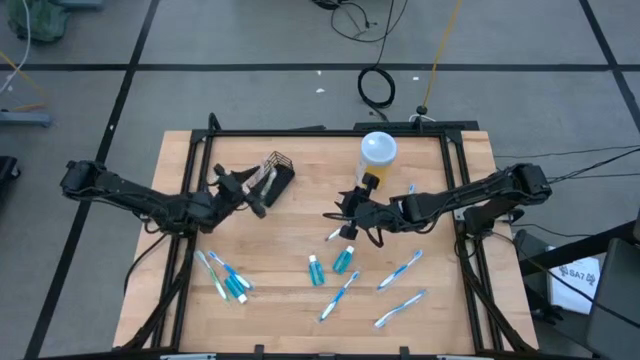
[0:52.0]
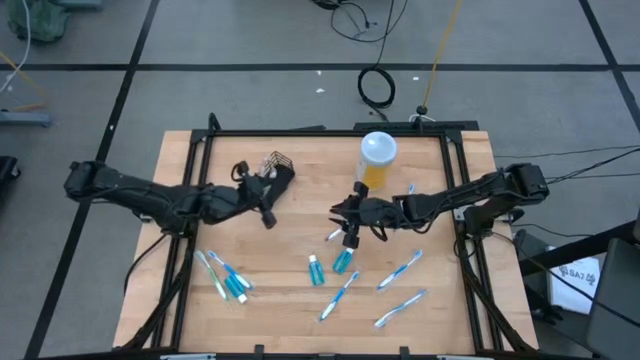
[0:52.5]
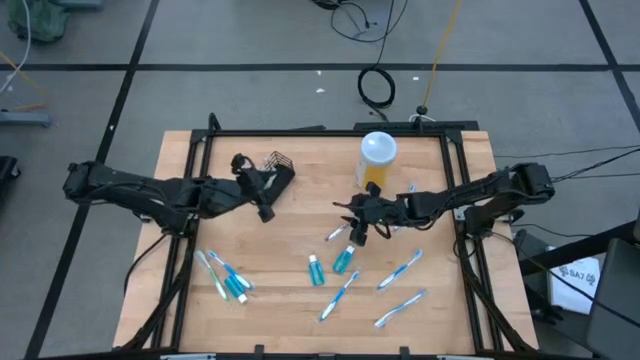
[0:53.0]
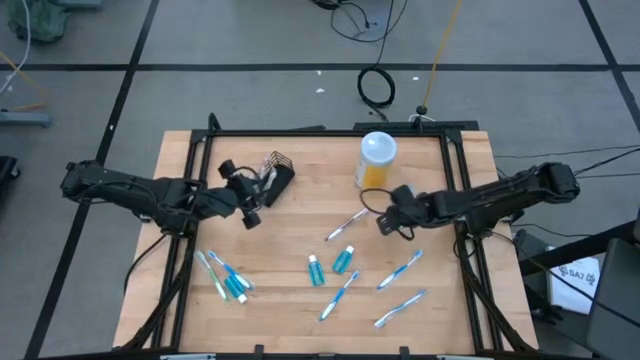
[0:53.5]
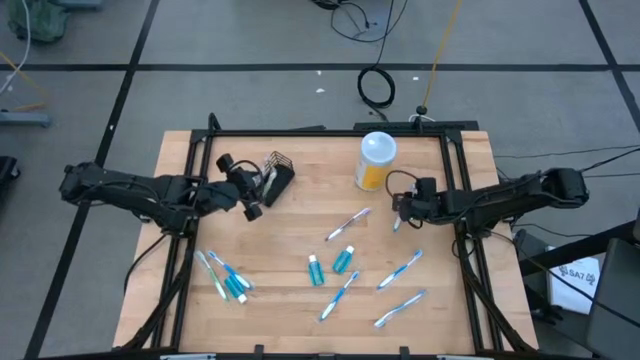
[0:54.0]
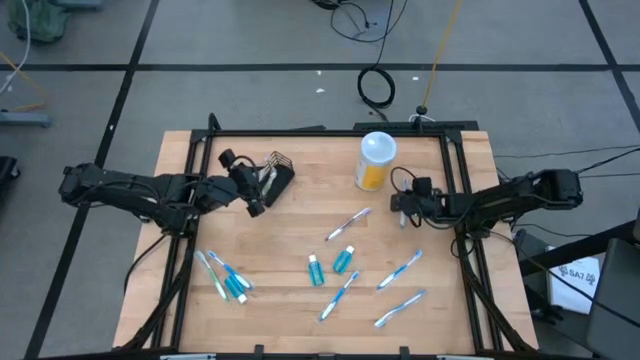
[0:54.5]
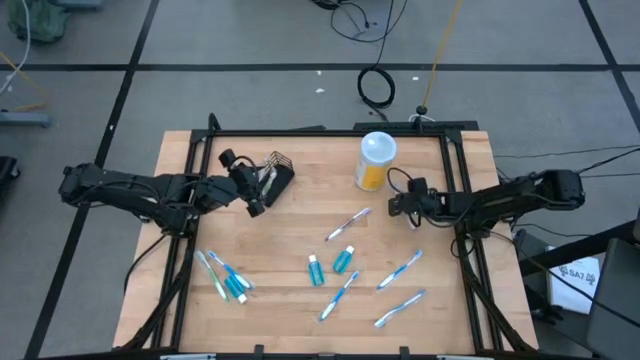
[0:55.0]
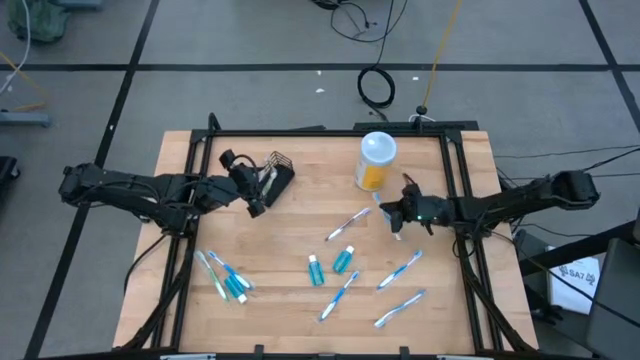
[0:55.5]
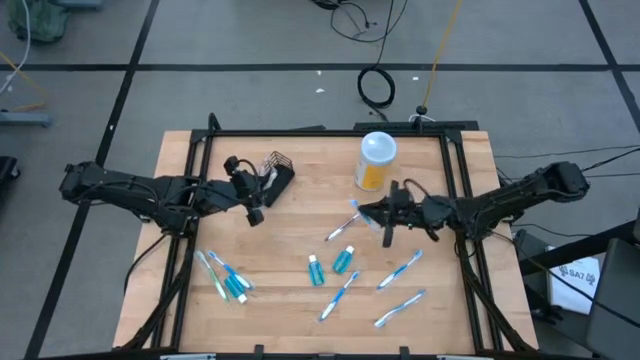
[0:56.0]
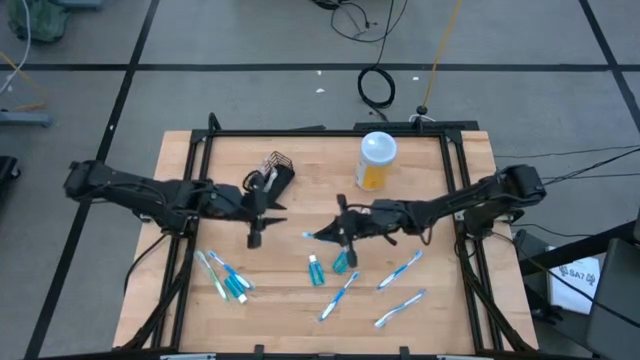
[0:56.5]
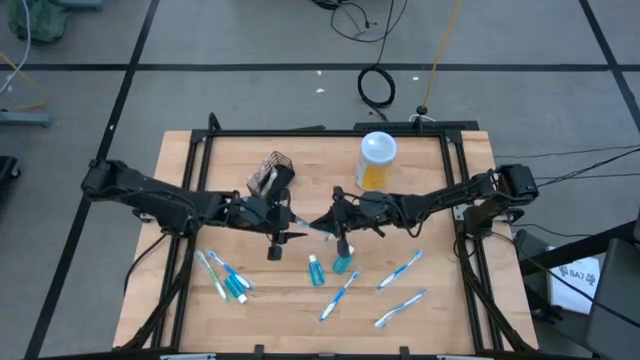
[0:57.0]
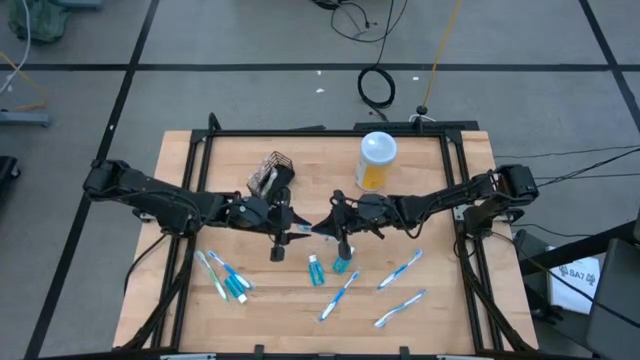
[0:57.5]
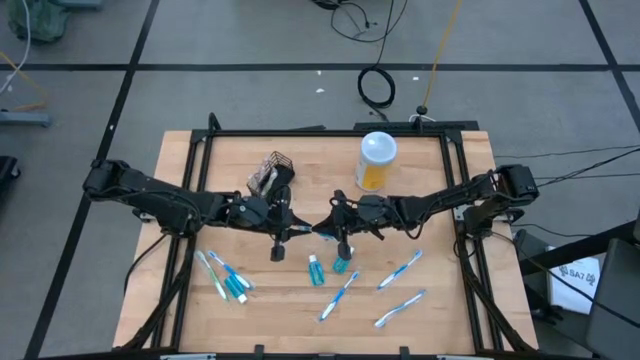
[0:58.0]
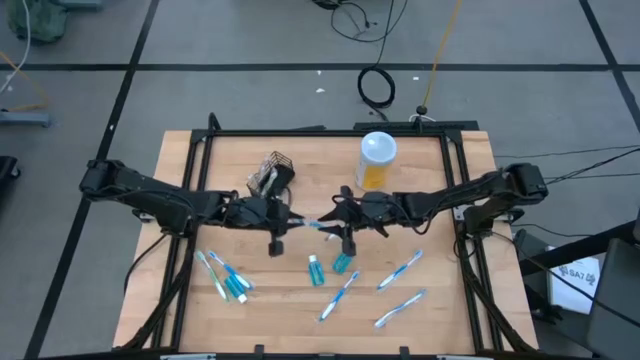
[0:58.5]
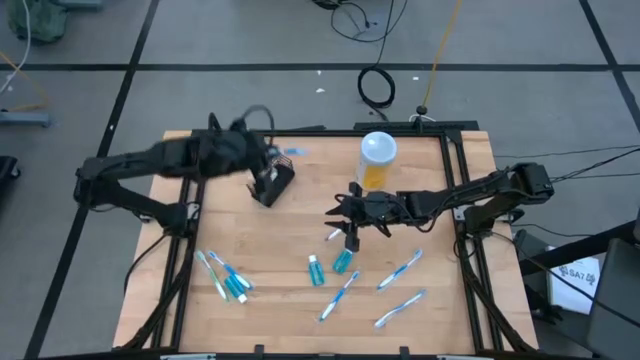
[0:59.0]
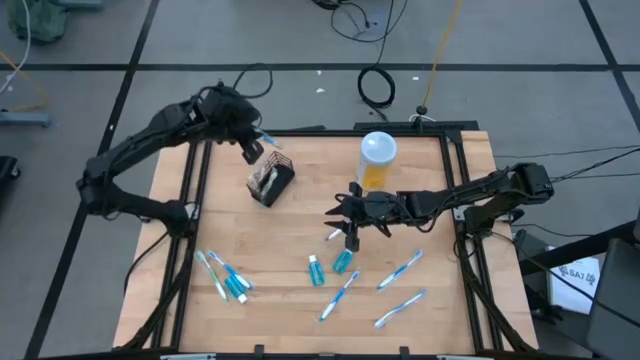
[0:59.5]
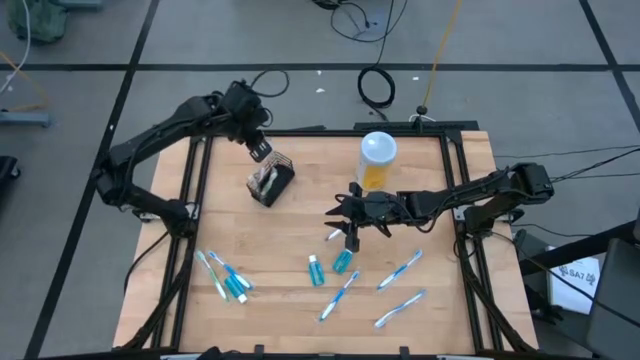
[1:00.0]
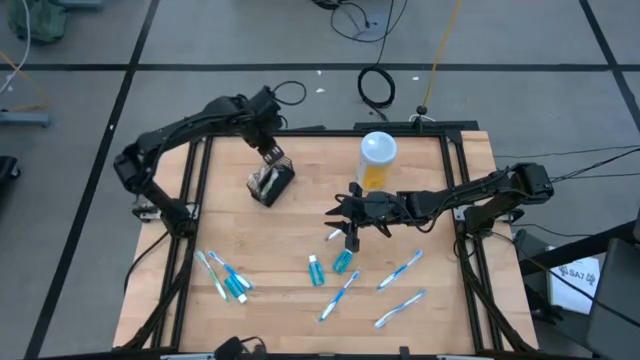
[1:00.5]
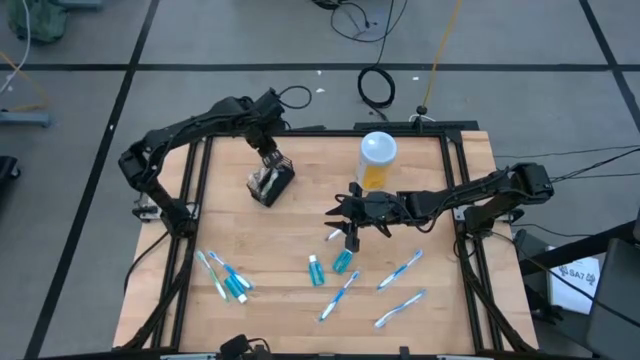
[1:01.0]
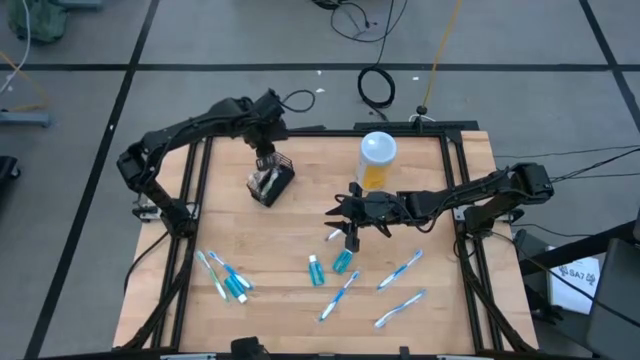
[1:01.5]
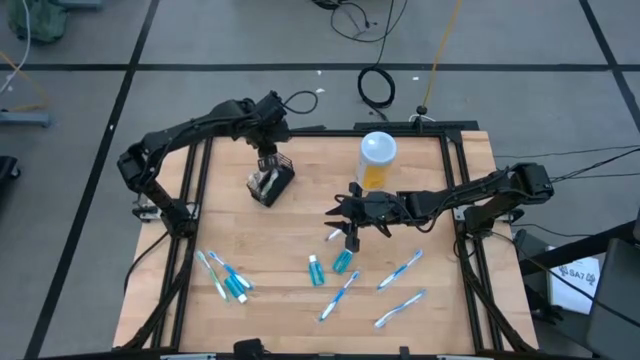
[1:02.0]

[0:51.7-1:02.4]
Task: Pick & Place toothbrushing station
Put the top right blue toothbrush into the black wire organizer

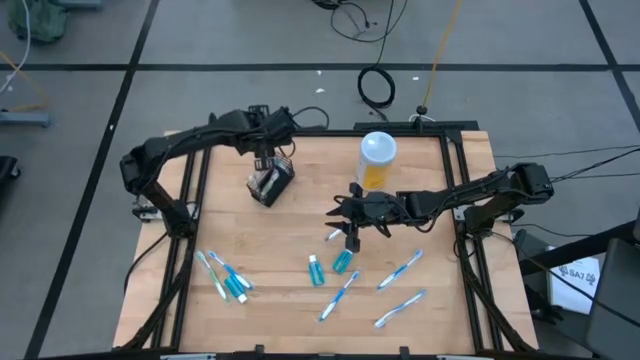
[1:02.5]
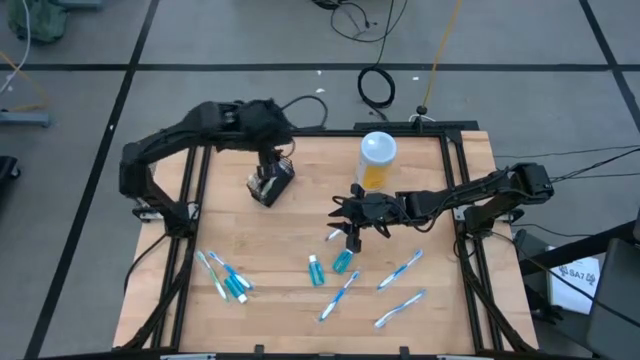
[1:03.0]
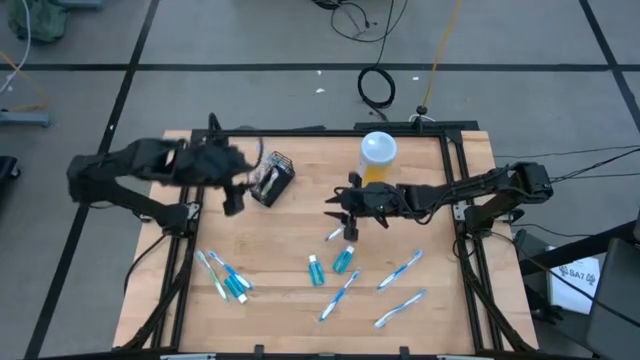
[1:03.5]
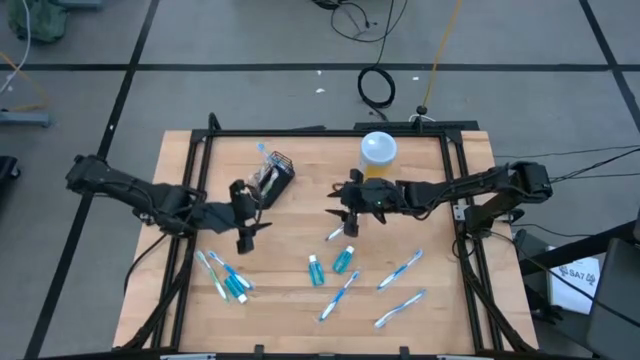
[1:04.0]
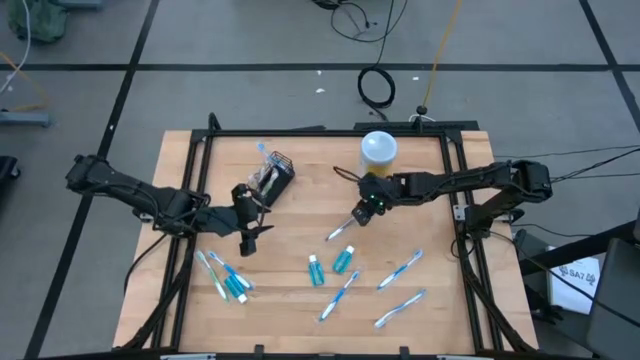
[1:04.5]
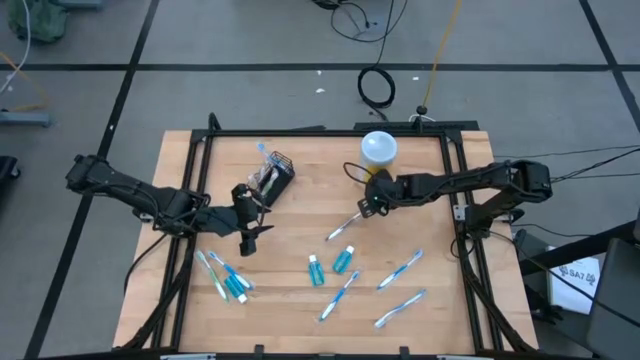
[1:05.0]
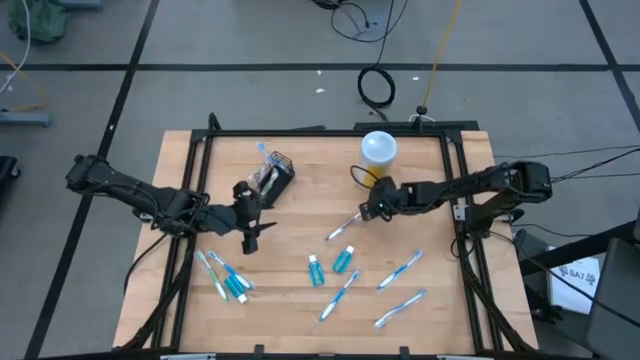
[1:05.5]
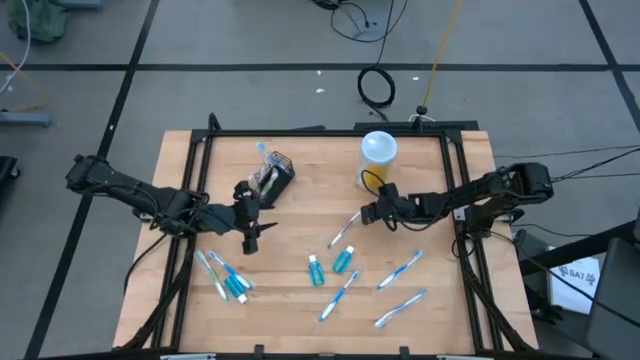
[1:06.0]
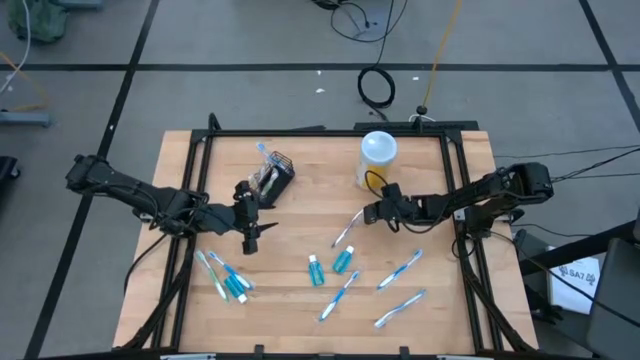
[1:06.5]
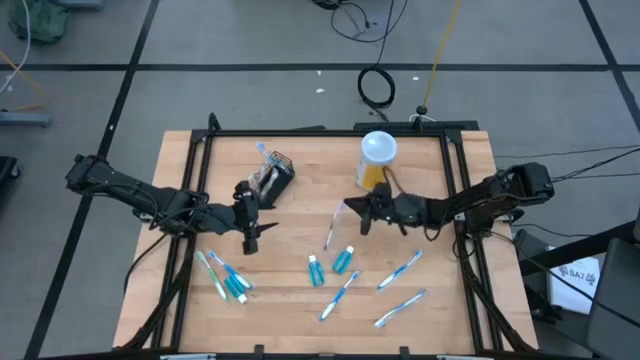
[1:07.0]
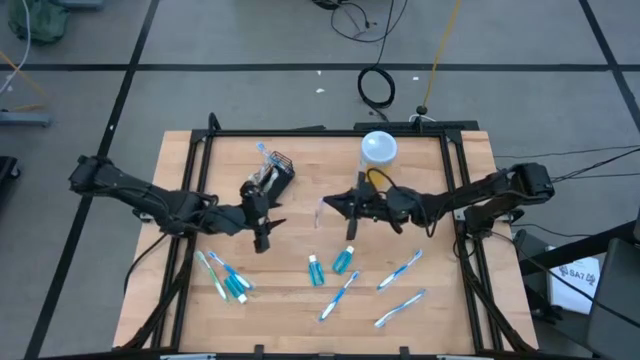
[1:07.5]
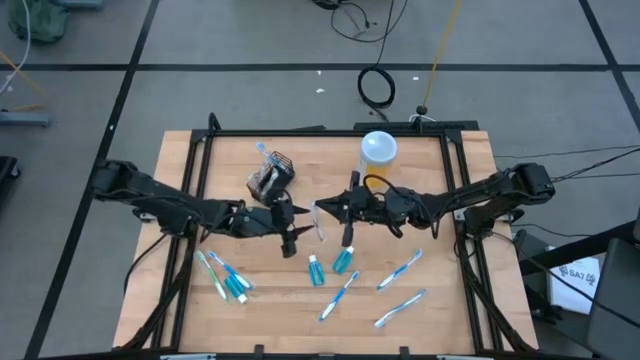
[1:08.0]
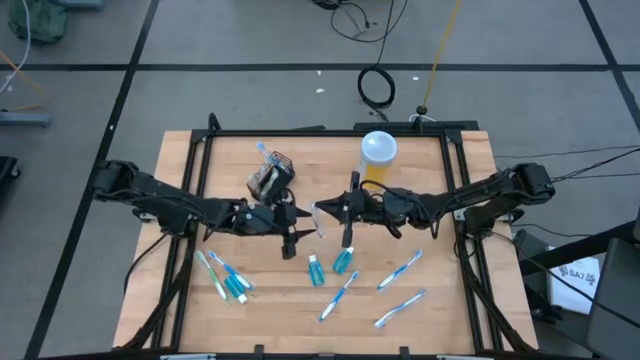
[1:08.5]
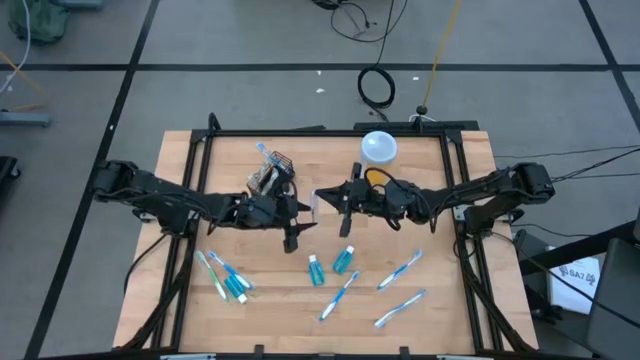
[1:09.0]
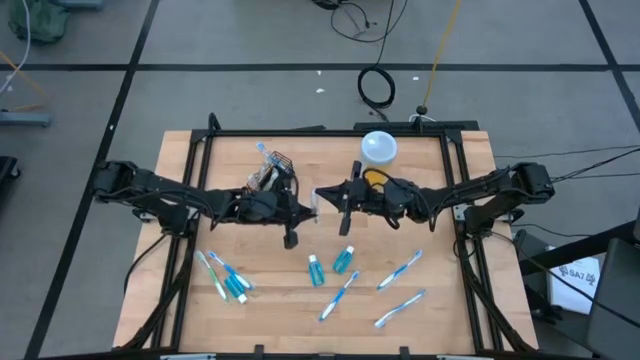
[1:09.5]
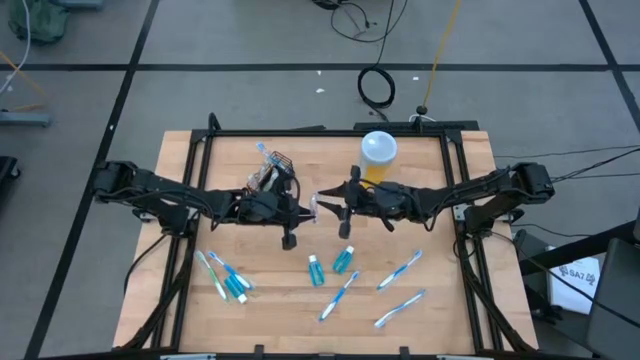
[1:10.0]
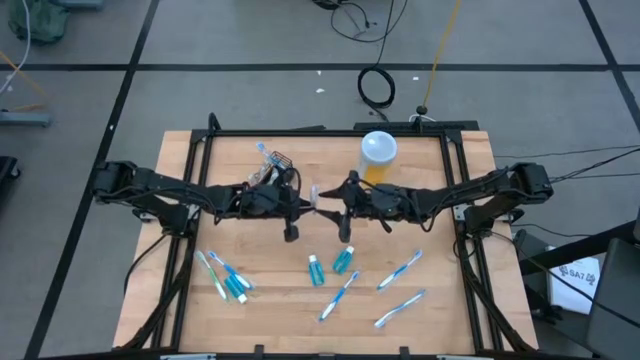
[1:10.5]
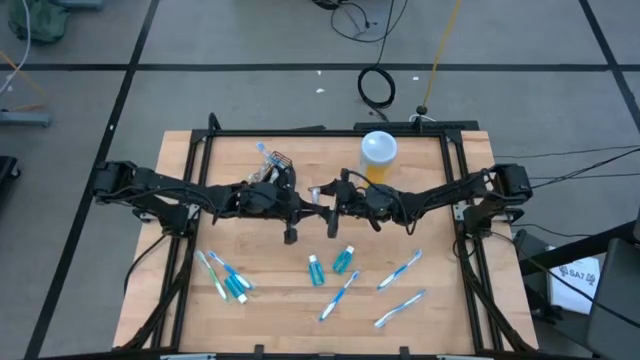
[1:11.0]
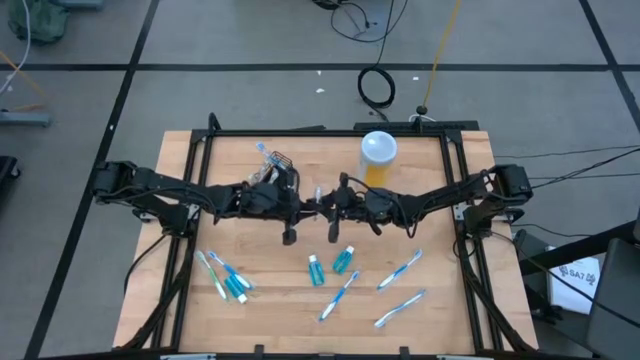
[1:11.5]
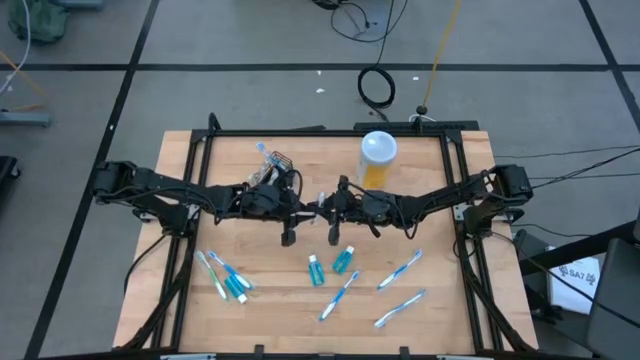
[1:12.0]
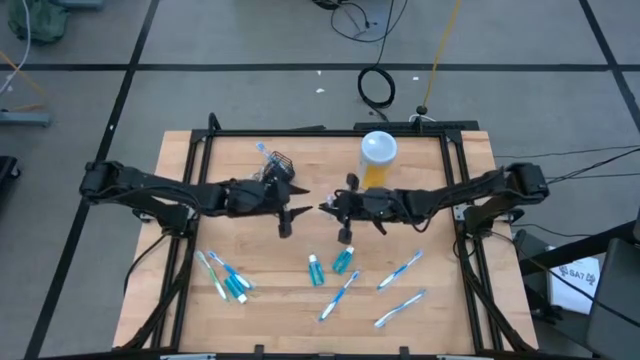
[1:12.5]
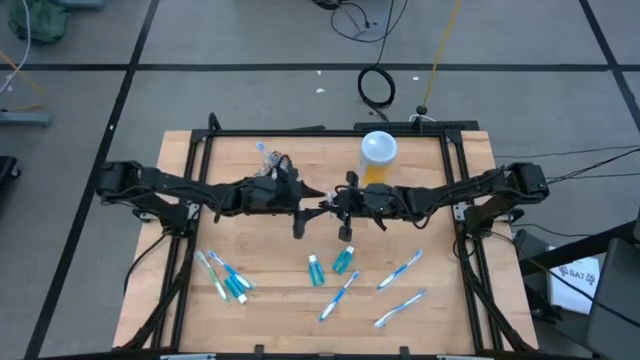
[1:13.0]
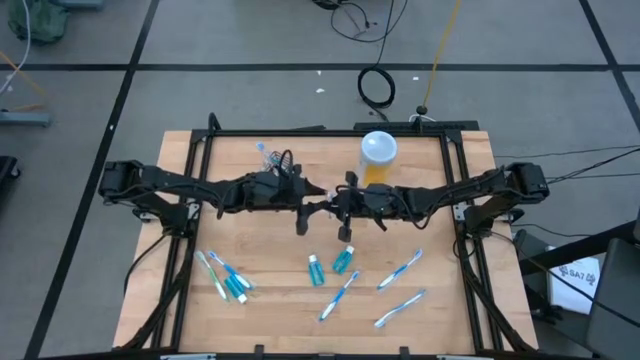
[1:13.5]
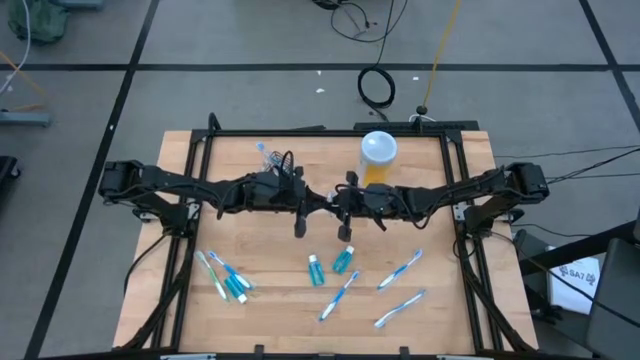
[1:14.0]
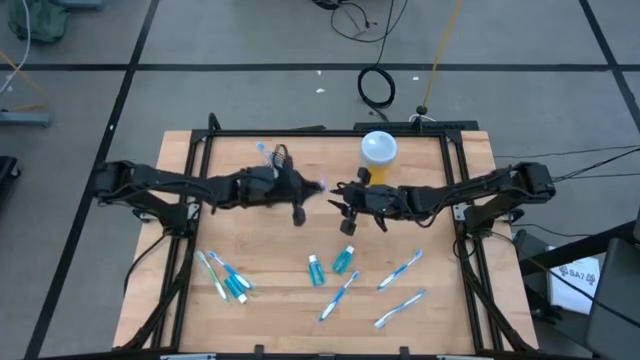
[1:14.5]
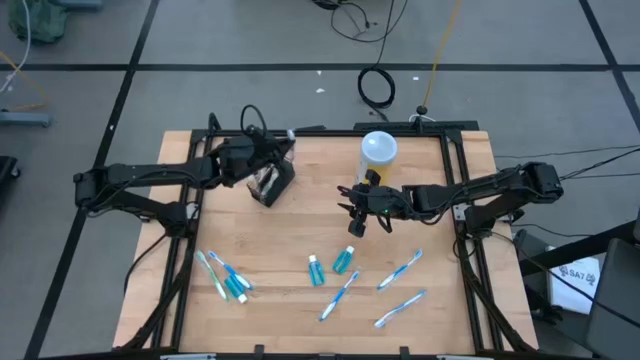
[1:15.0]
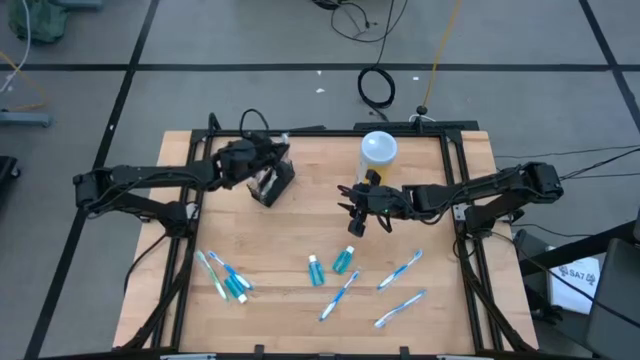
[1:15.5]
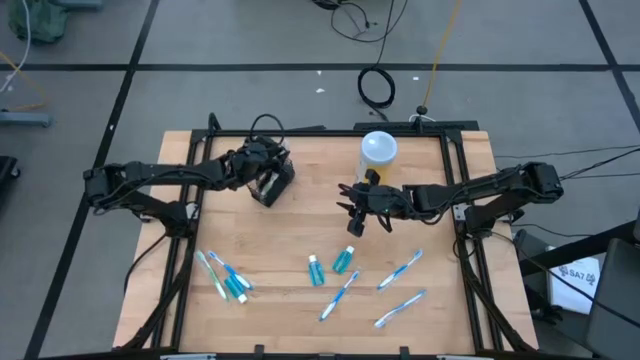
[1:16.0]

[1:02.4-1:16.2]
Put the violet toothbrush into the black wire organizer
